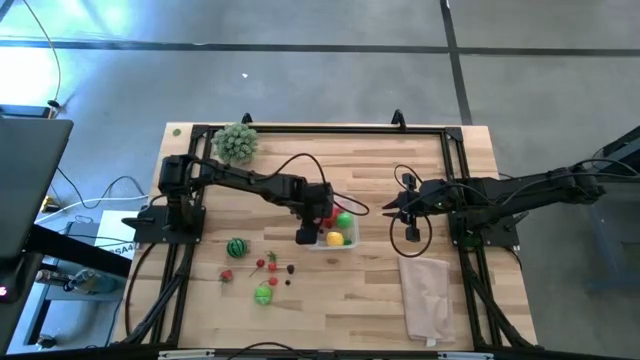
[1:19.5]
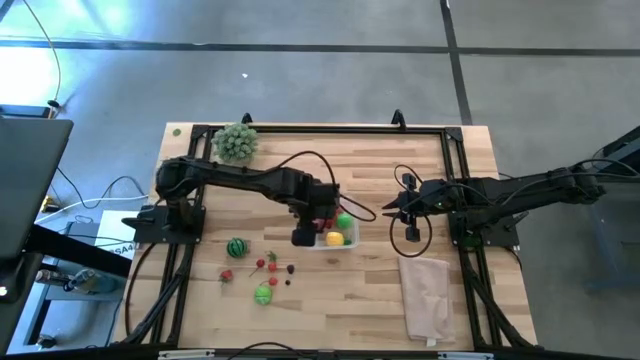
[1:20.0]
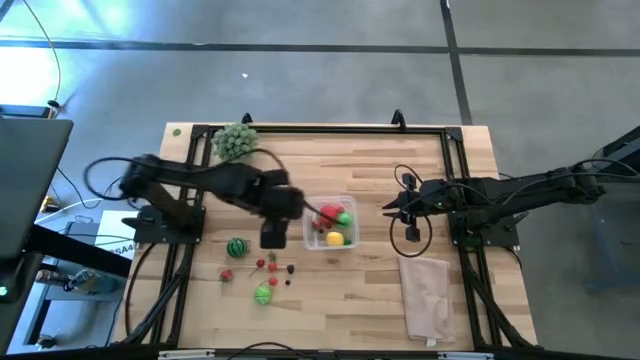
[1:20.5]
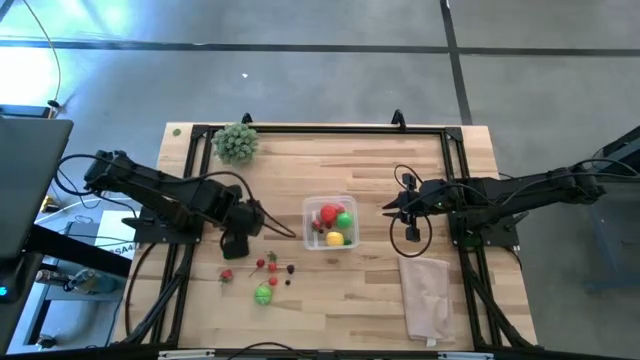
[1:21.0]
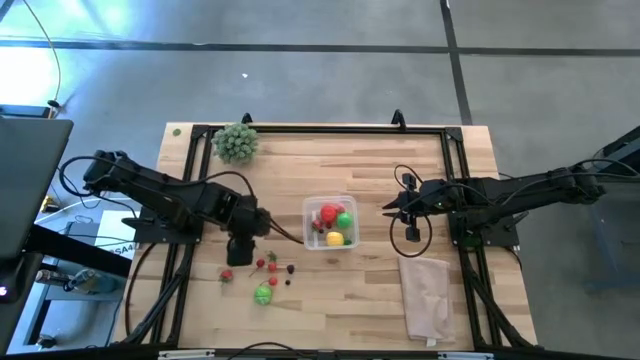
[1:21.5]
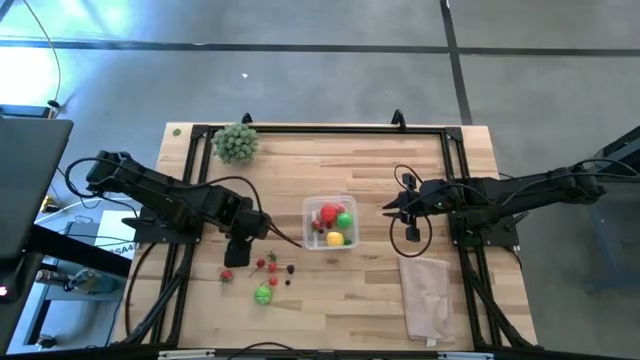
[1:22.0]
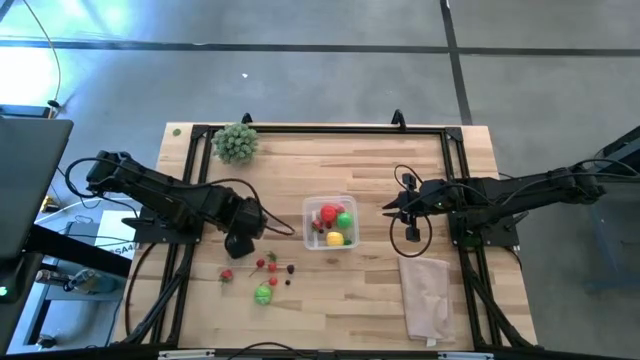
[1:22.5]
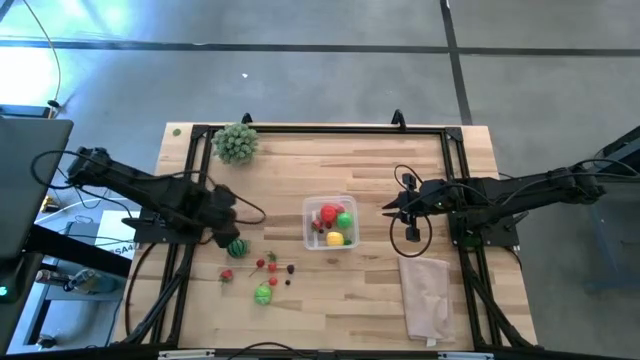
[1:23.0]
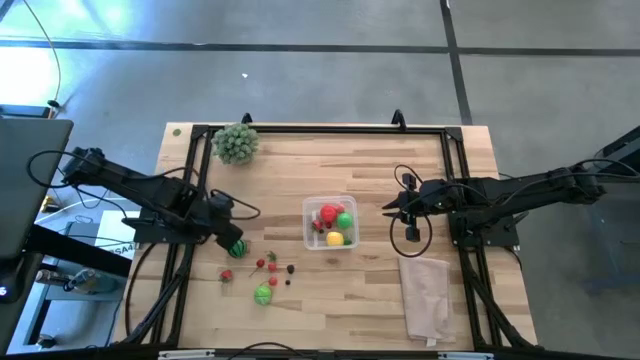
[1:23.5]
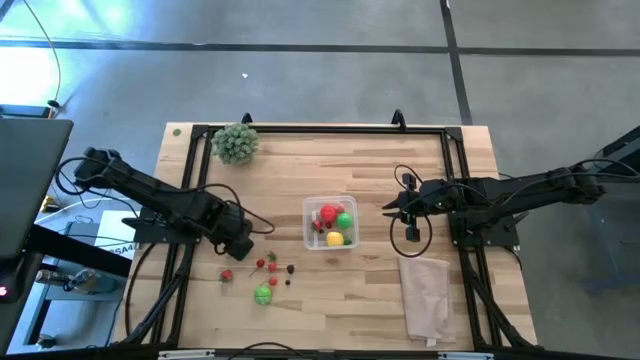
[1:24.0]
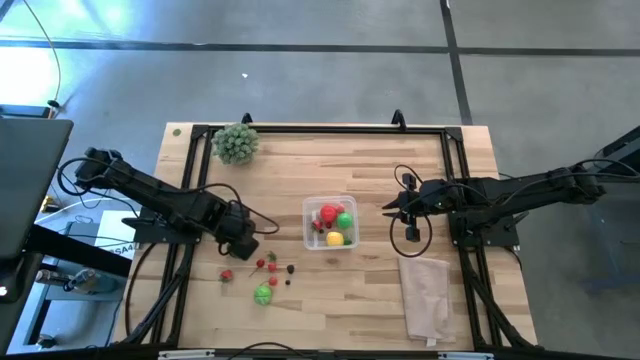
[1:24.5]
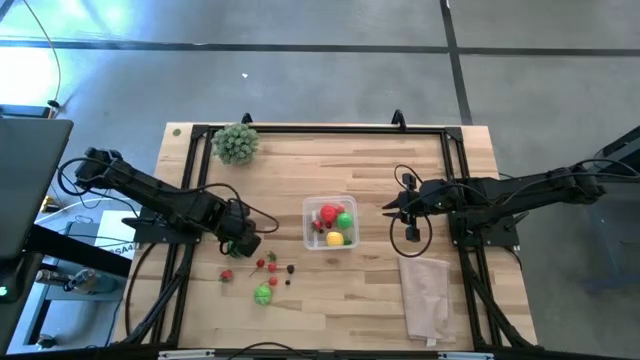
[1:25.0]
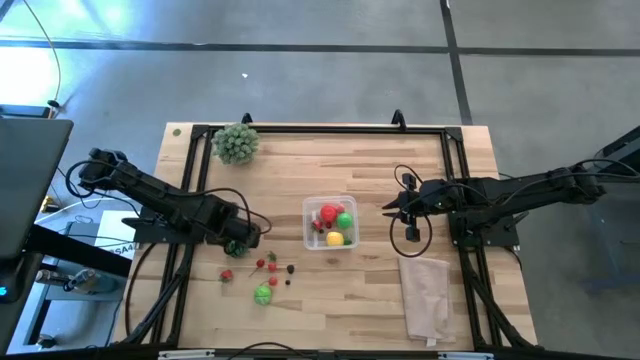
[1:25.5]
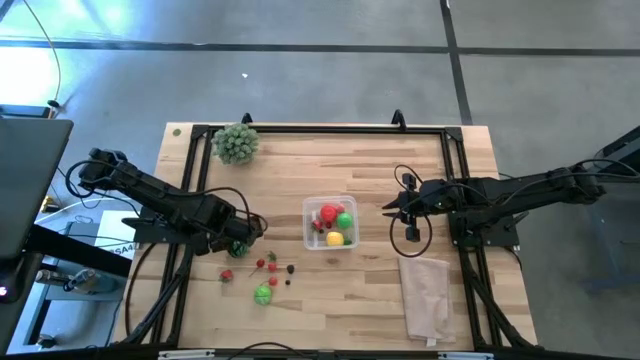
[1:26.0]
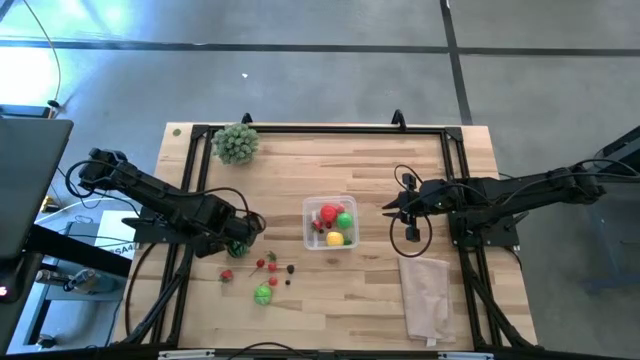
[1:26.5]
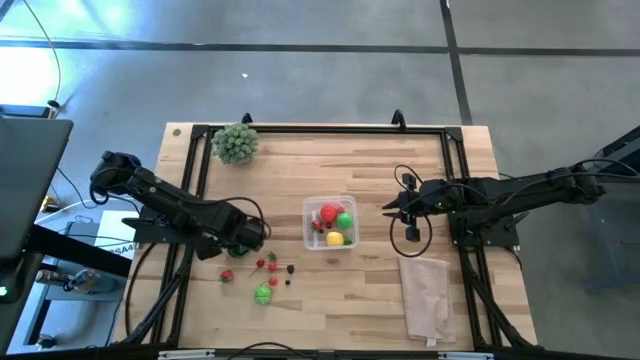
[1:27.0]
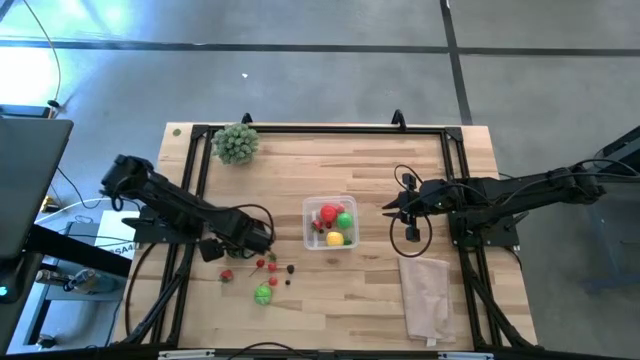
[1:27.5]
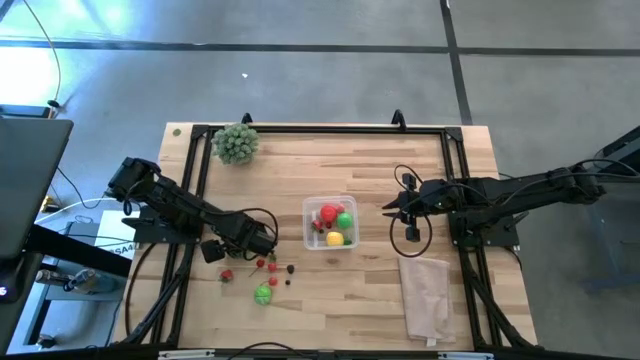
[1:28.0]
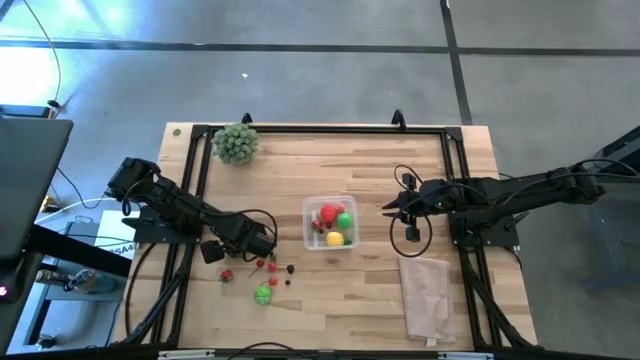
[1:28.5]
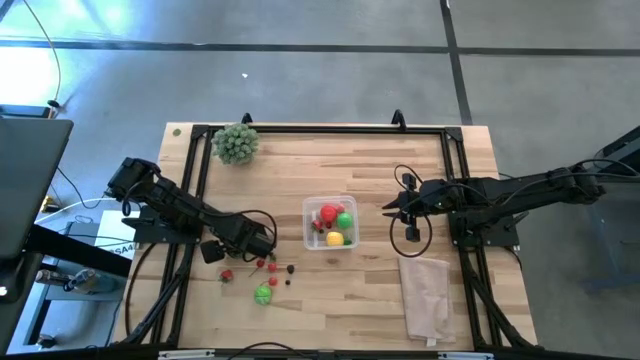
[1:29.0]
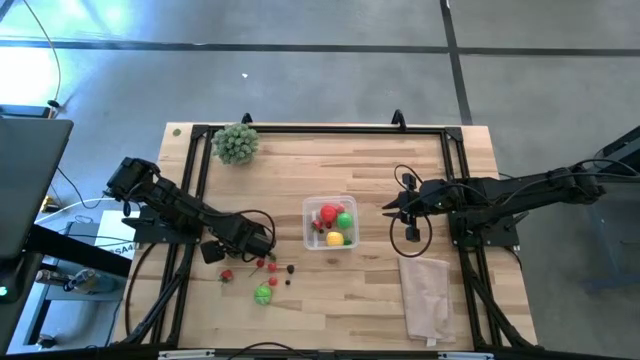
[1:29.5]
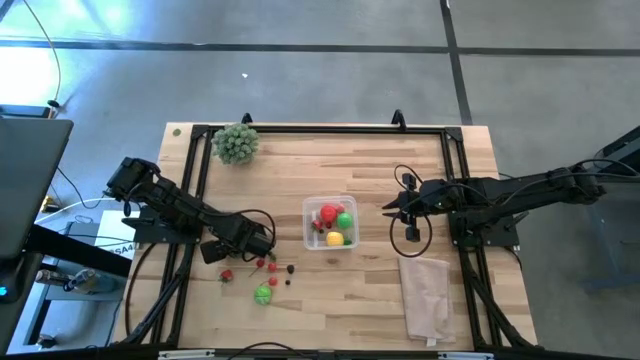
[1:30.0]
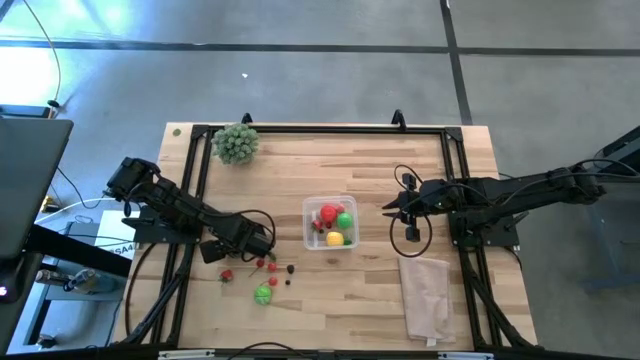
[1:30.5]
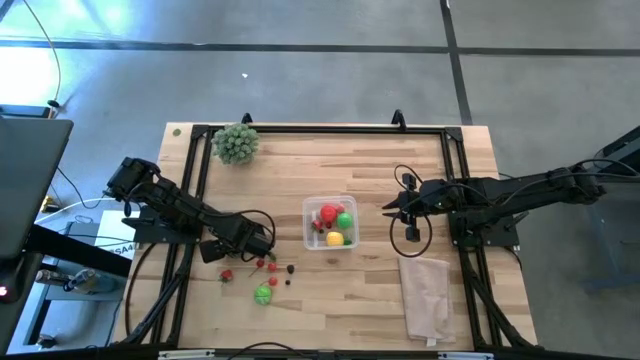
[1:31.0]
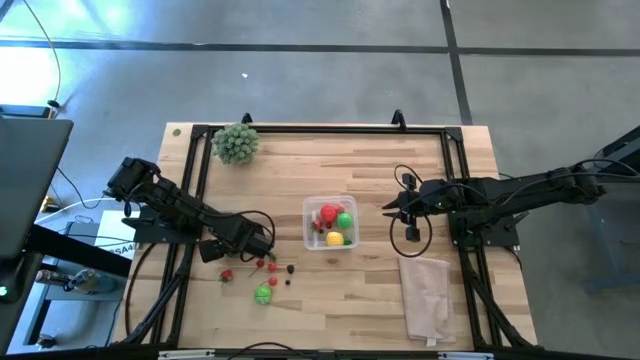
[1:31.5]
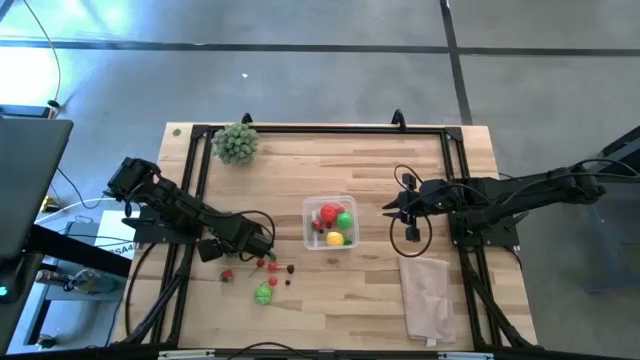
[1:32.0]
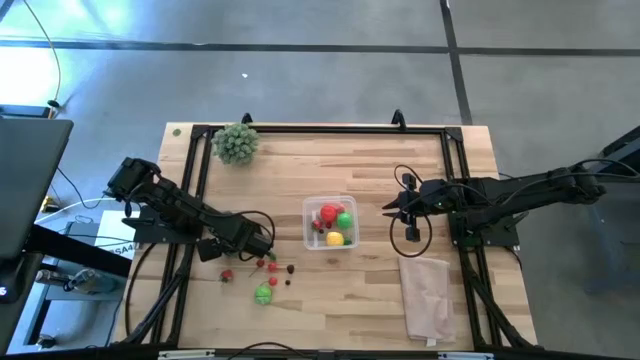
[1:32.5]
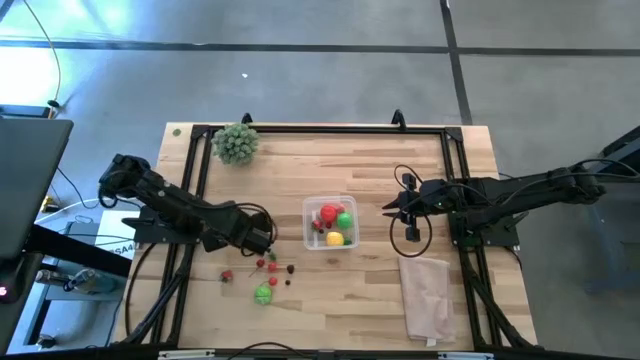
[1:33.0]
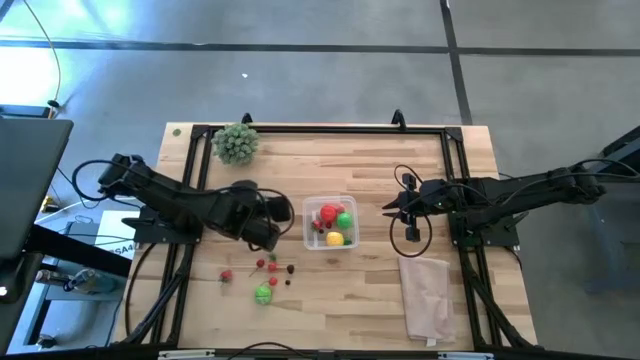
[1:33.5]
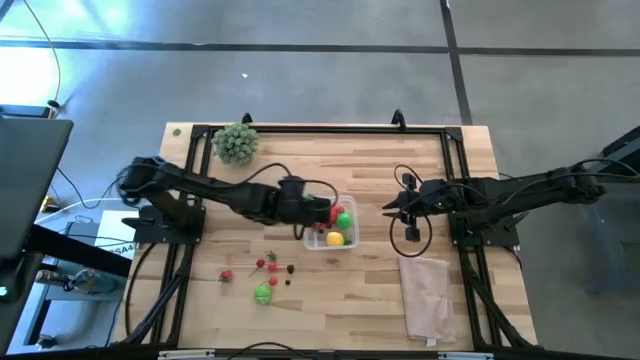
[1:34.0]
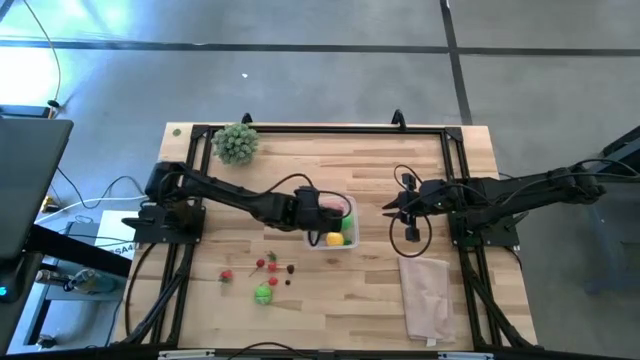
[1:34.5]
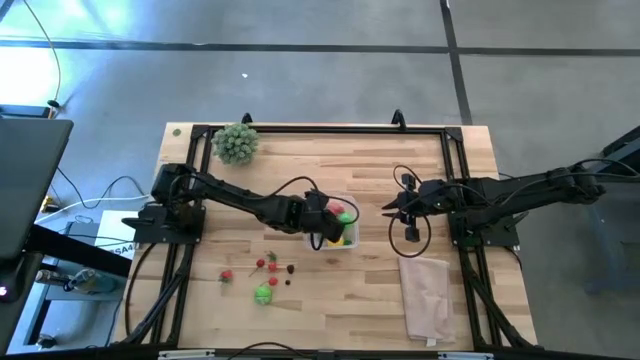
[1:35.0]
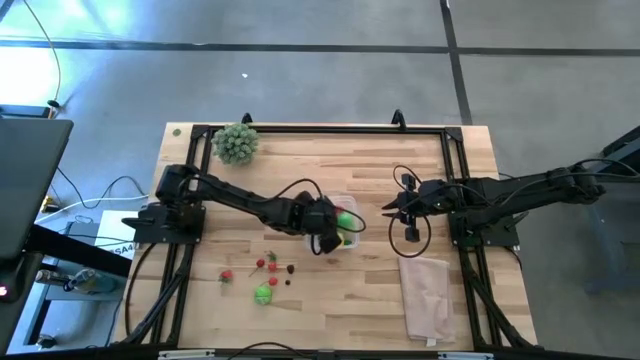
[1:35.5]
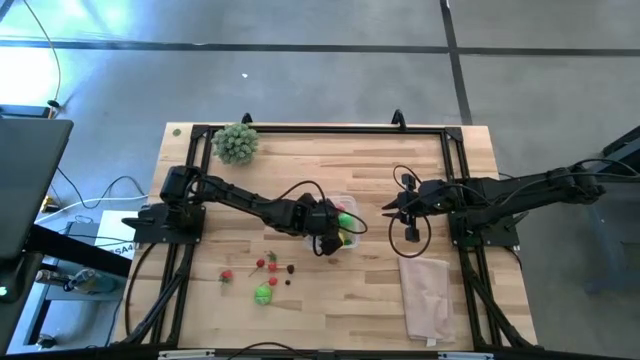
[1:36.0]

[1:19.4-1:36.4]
Task: Pick and placing Produce into tupperware
Put the watermelon into the transparent bin

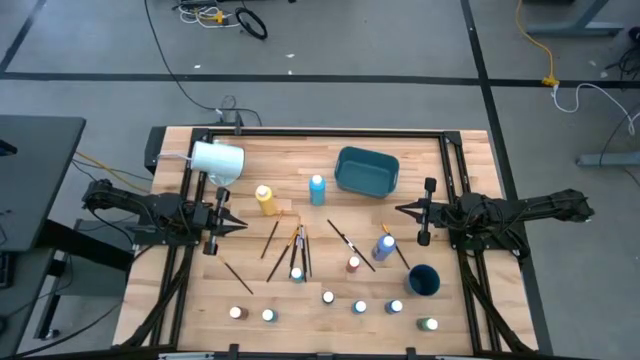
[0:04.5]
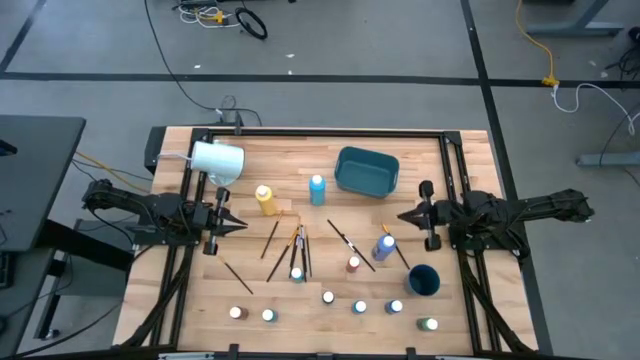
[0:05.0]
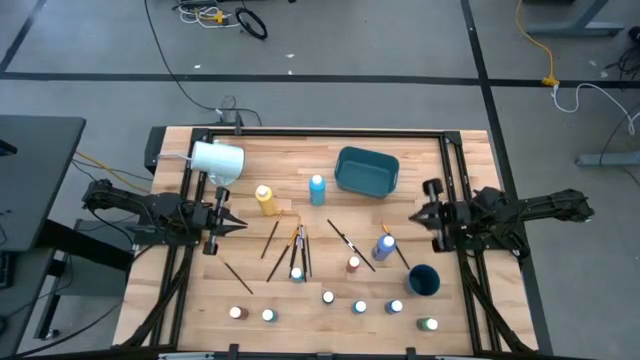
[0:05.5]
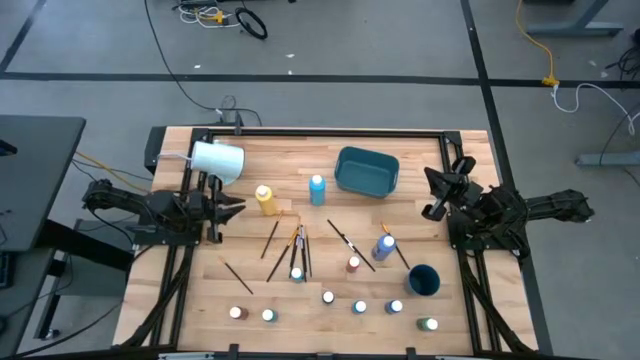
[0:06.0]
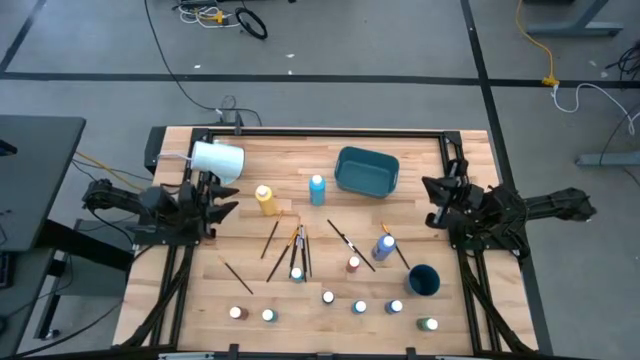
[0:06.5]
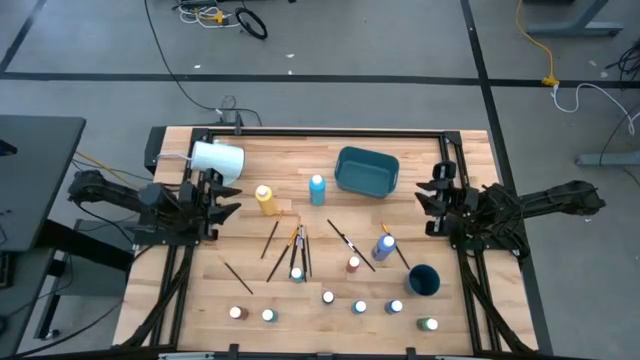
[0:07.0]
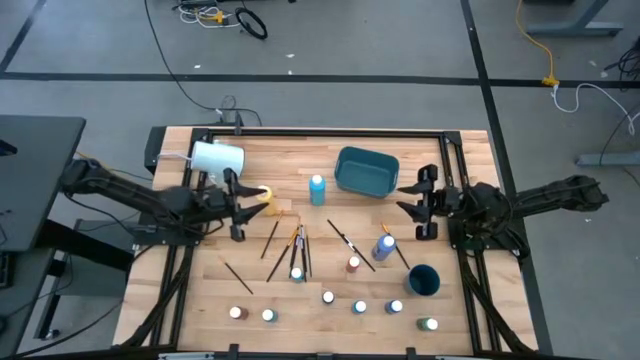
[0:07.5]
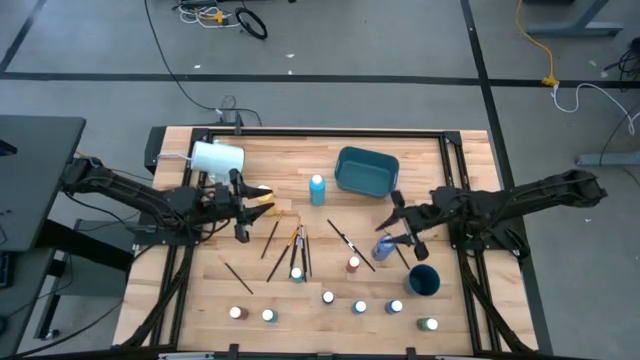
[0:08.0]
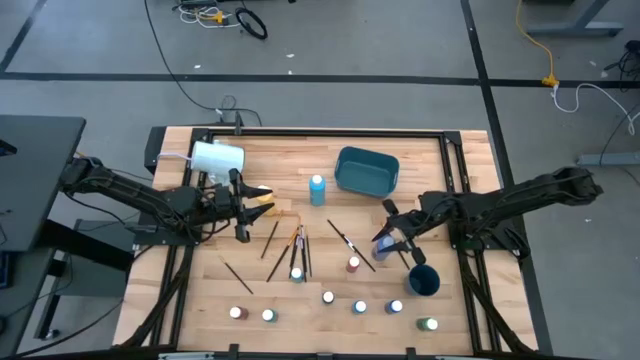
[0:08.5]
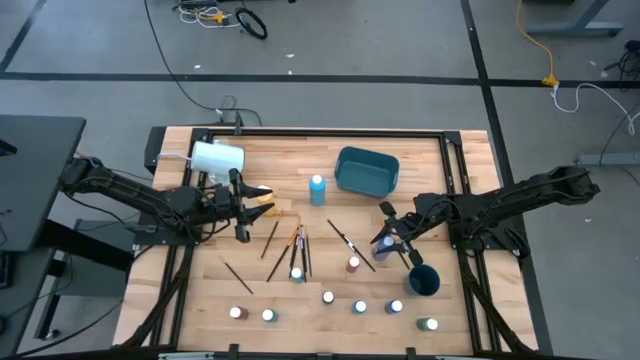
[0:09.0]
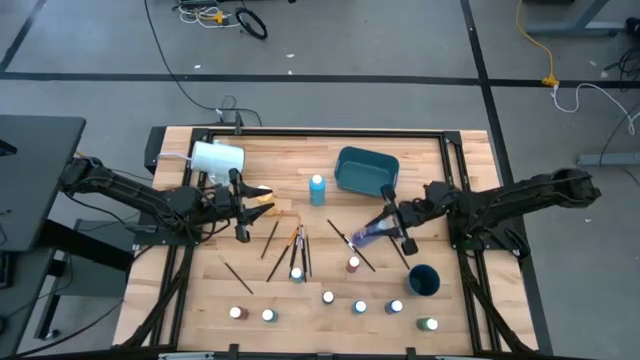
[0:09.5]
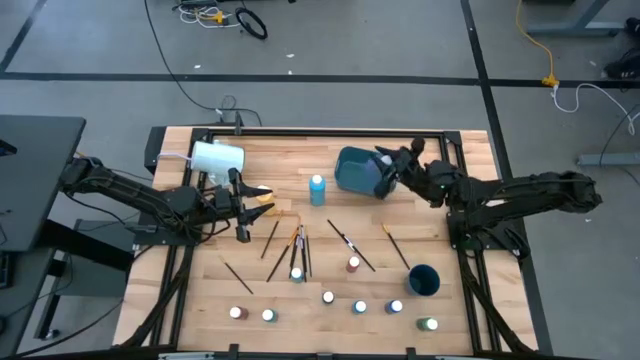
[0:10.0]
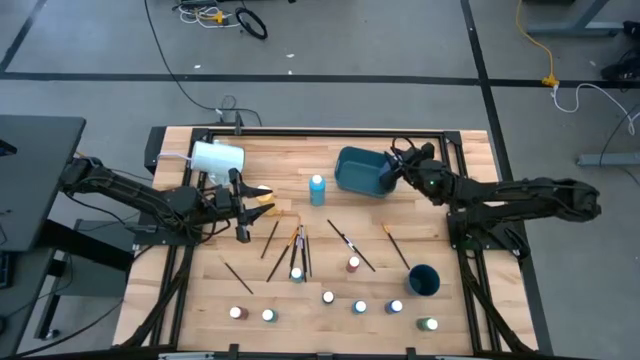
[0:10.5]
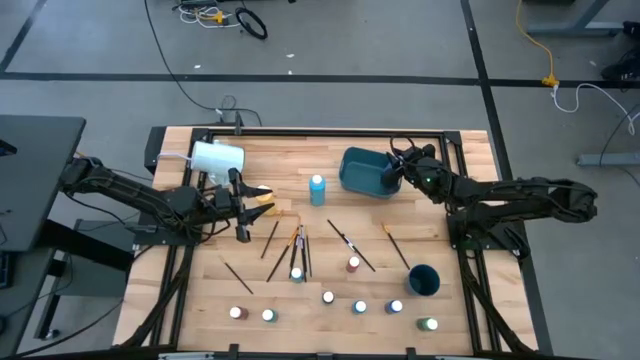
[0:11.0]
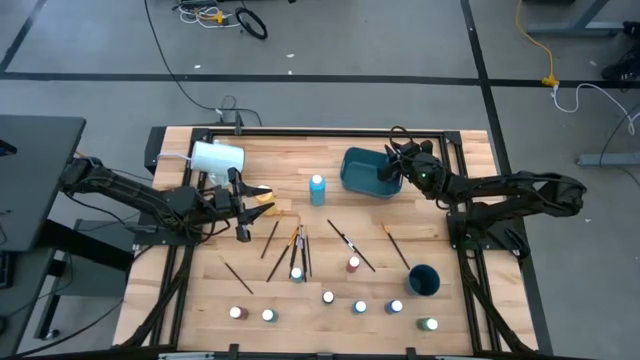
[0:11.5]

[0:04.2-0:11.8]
Task: Pick & Place Paint Supplies
Put the large violet paint bottle into the bin
